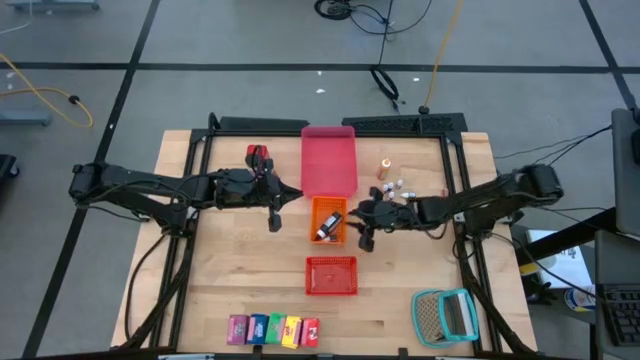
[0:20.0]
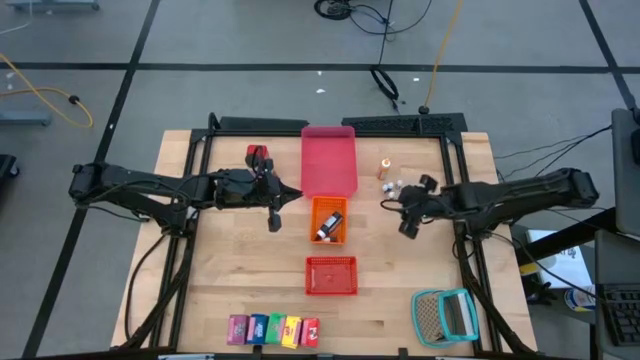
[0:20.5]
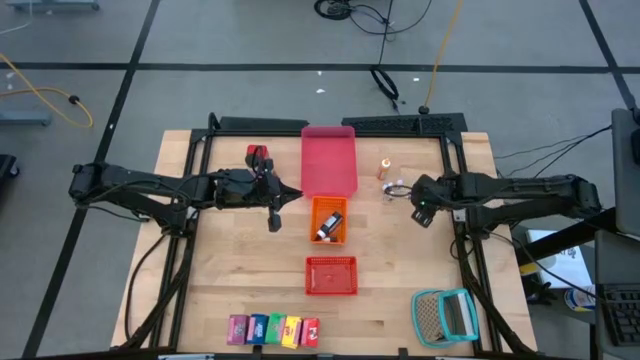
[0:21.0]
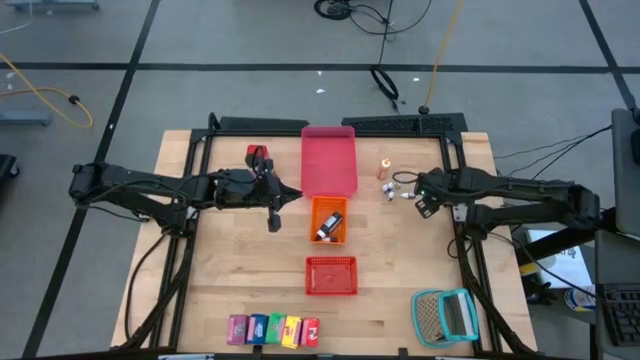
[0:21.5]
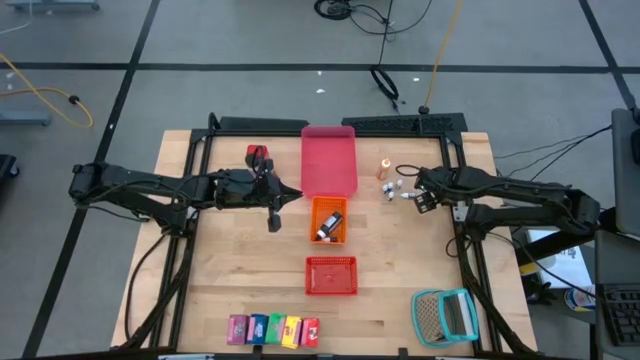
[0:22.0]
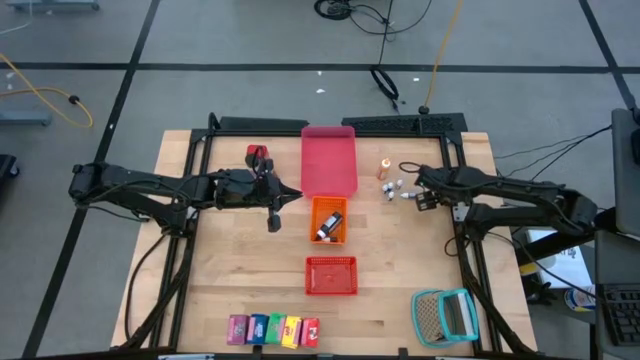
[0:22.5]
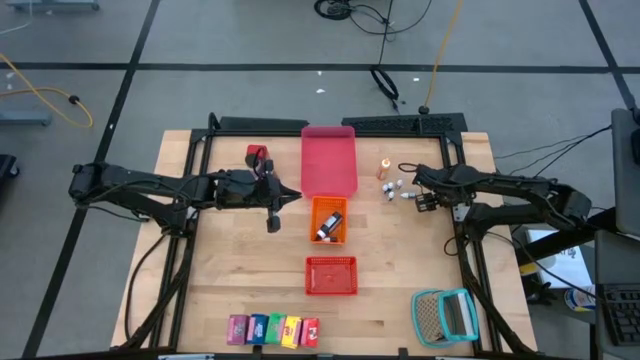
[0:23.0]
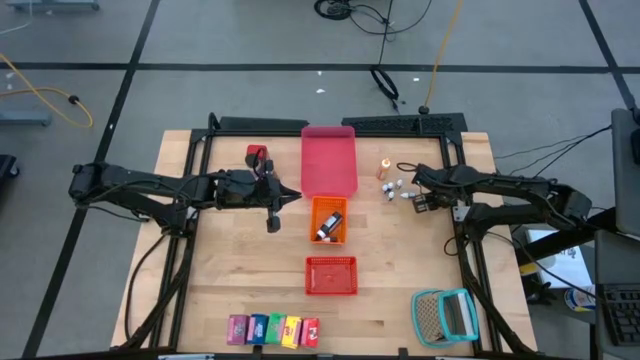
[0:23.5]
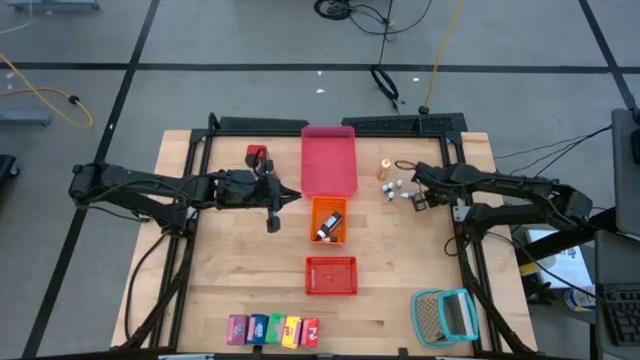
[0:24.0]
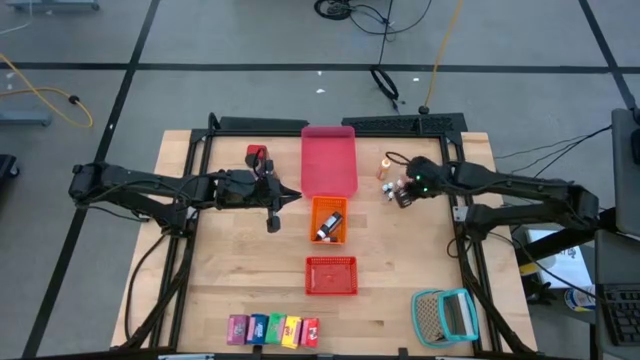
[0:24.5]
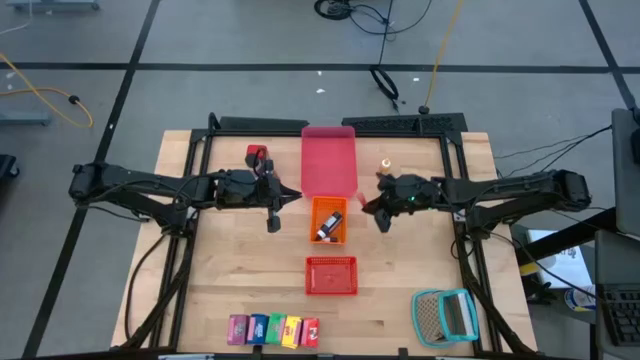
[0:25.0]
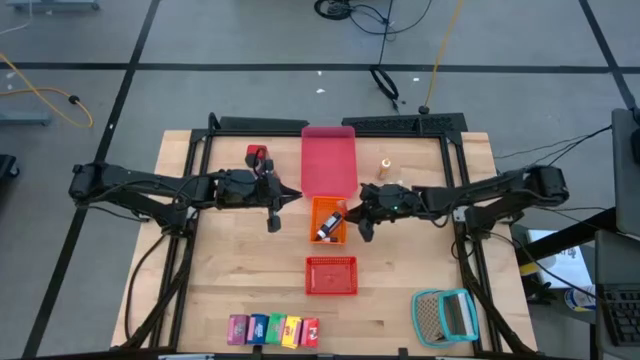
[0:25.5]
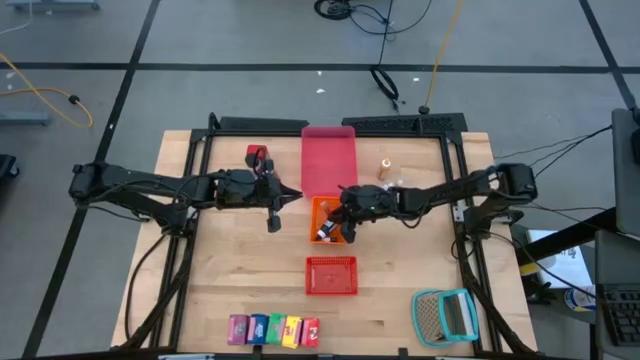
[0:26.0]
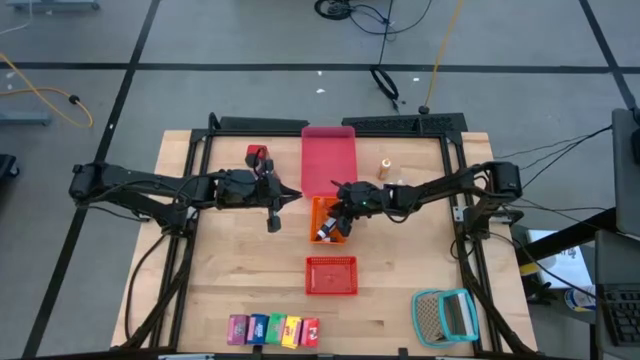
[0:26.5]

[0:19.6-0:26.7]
Task: Pick & Place Kitchen Items
Put the yellow food coloring bottle into the orange basket

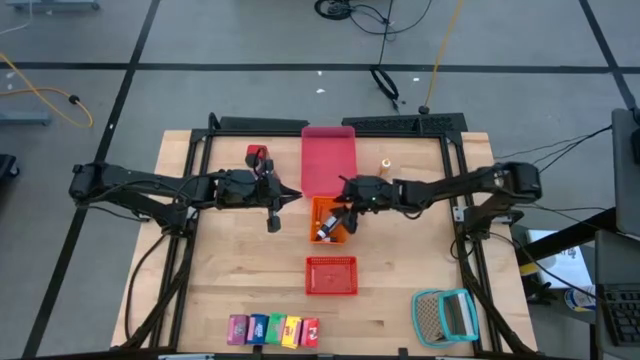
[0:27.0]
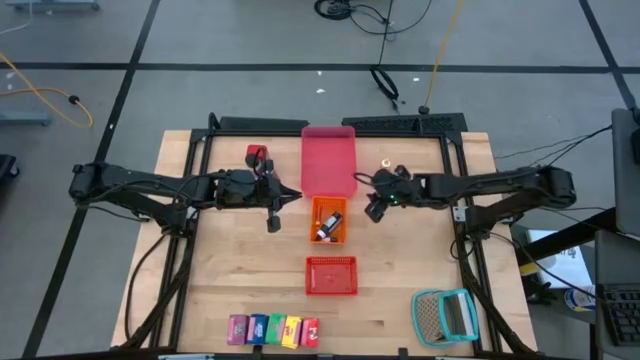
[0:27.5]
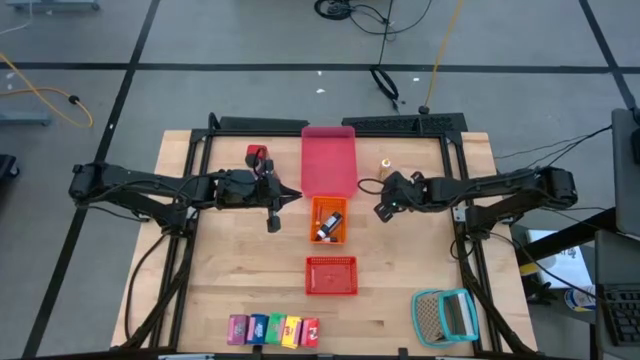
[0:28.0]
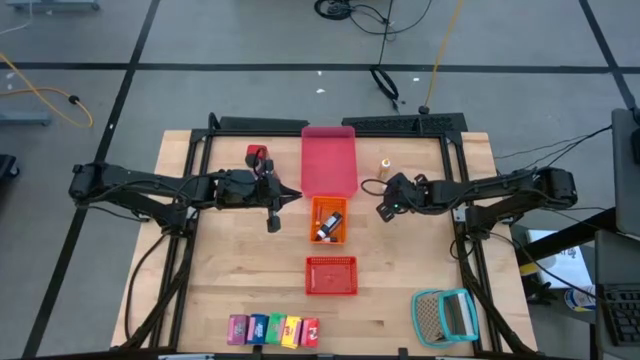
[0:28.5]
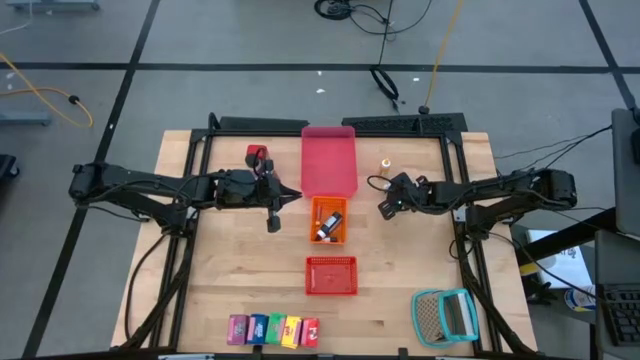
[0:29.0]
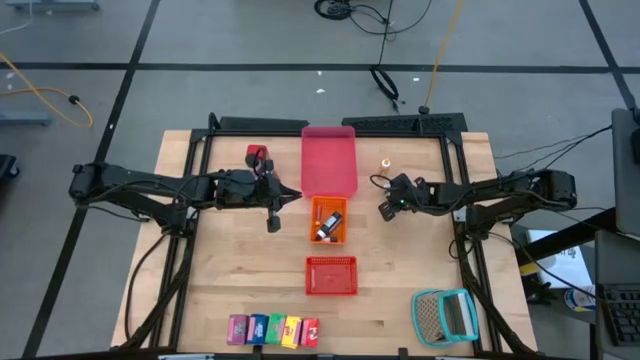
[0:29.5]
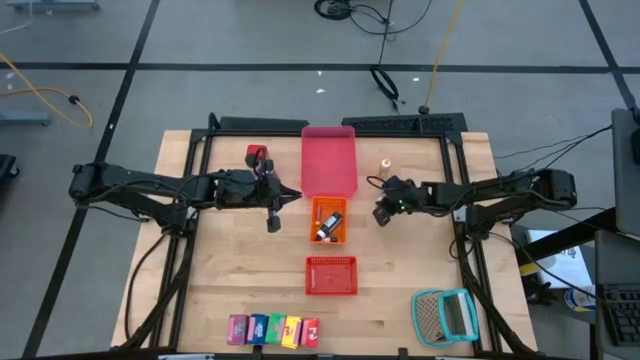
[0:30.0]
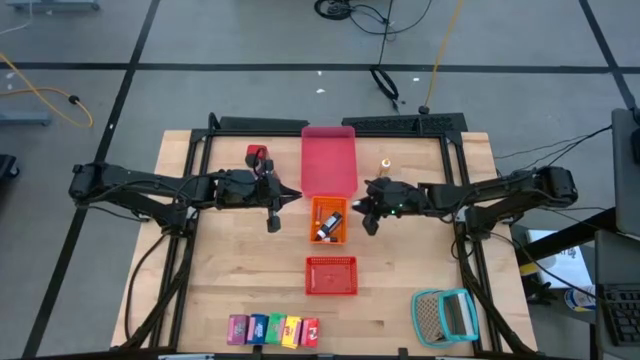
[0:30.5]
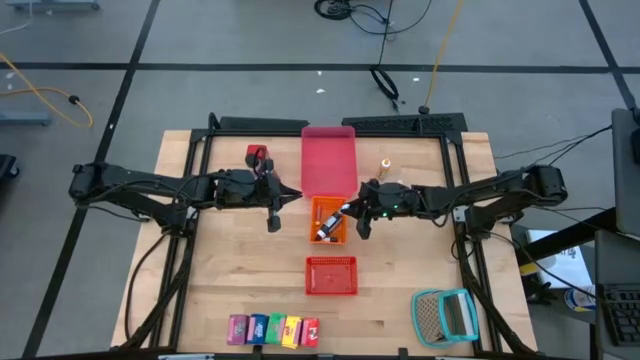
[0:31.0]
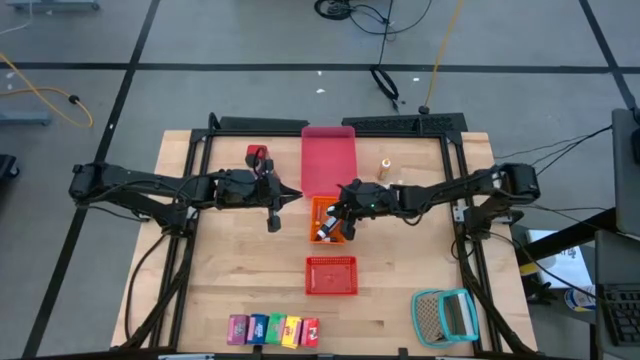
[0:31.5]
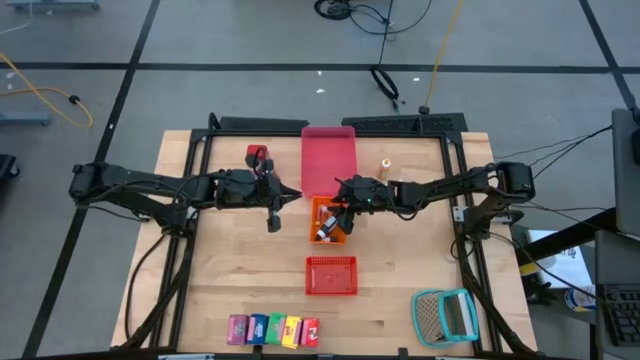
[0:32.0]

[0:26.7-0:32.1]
Put the small green food coloring bottle into the orange basket

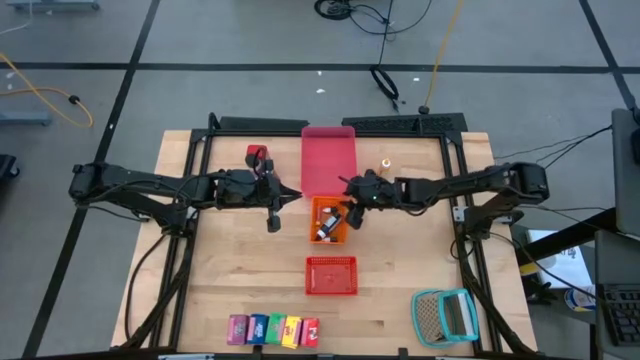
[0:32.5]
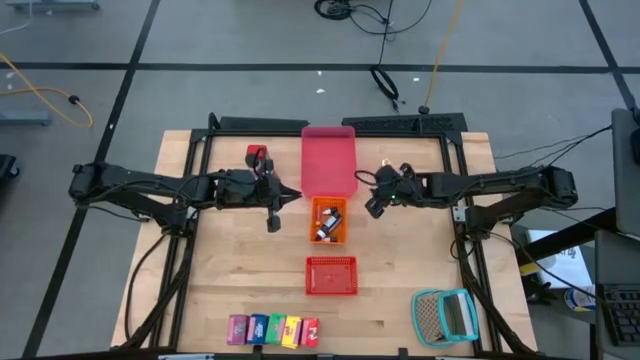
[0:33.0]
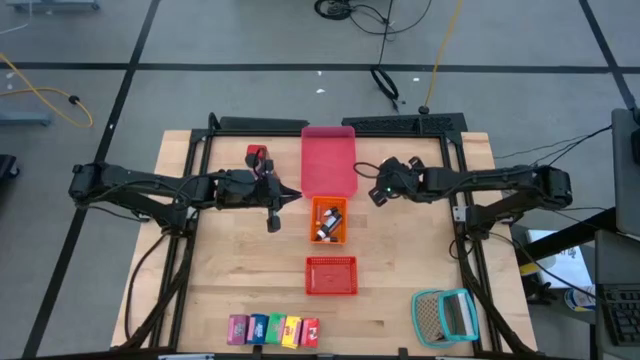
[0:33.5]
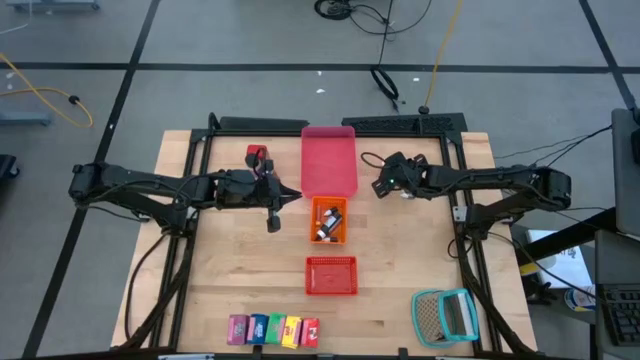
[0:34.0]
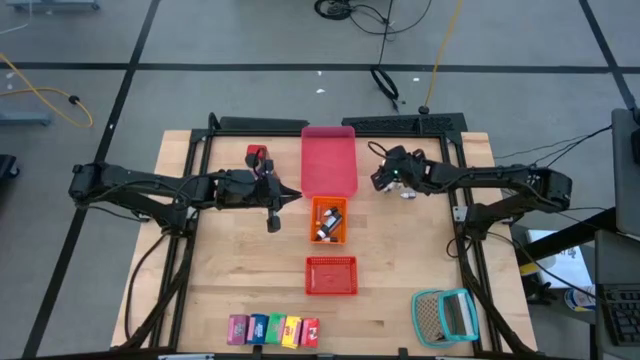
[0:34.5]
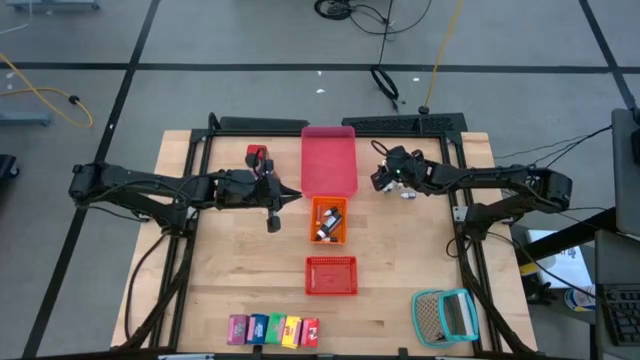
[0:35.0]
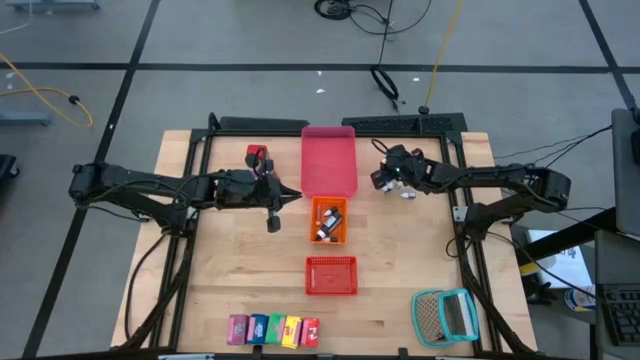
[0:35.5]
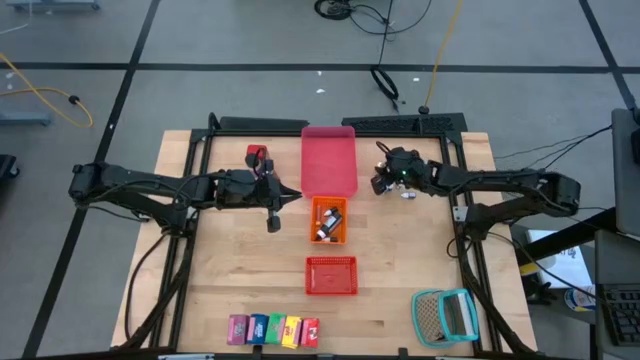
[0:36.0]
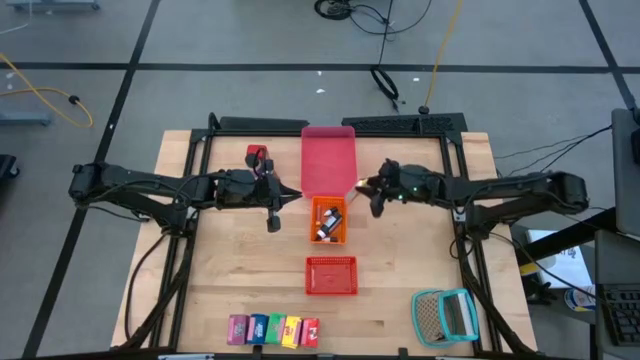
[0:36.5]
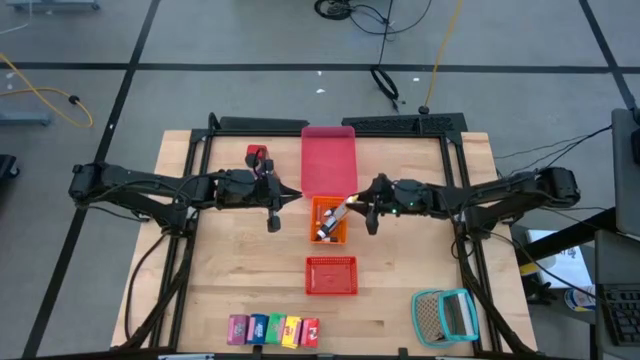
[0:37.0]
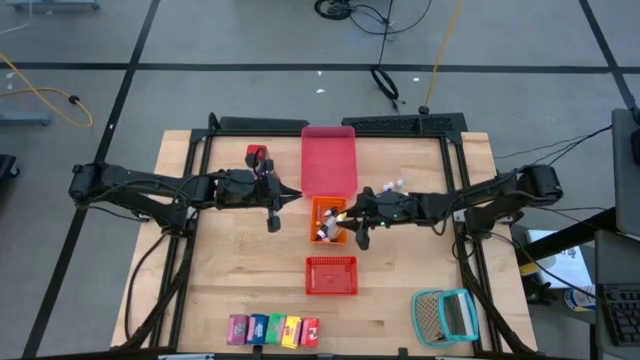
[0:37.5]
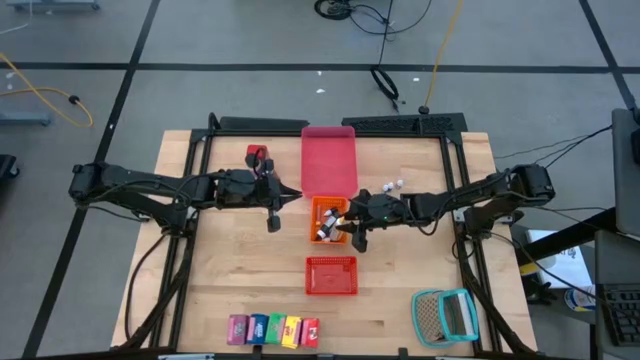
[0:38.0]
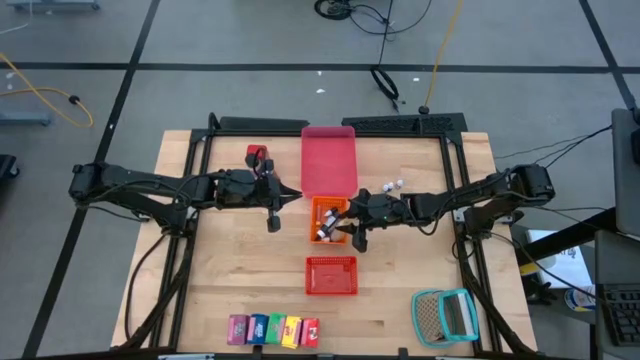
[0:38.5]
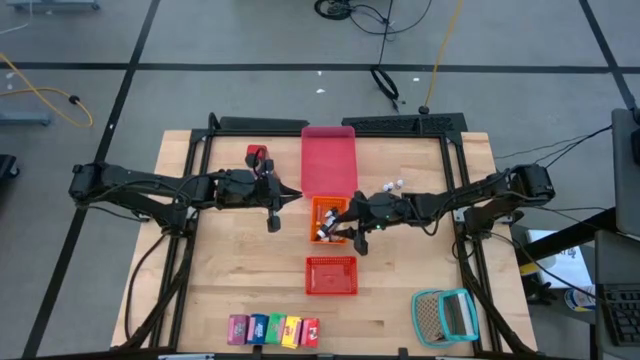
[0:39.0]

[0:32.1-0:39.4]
Put the large yellow food coloring bottle into the orange basket

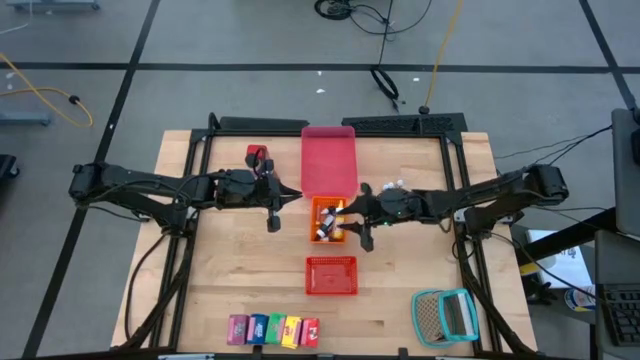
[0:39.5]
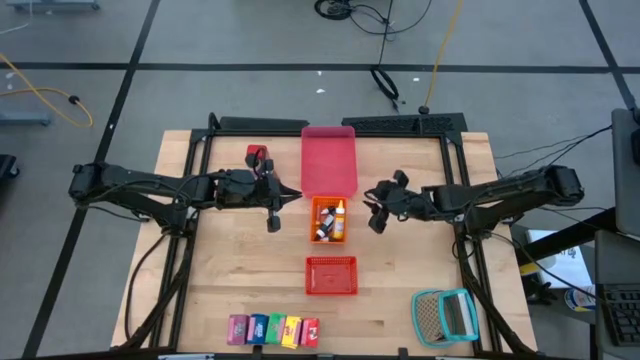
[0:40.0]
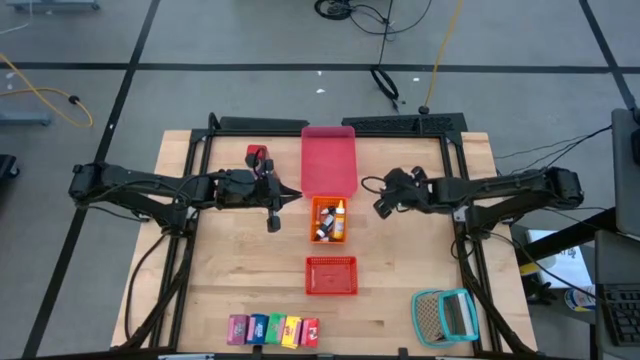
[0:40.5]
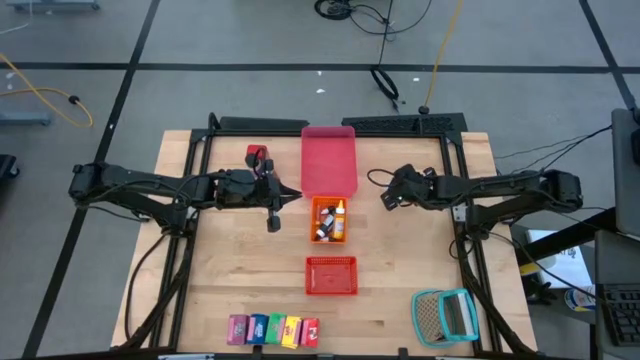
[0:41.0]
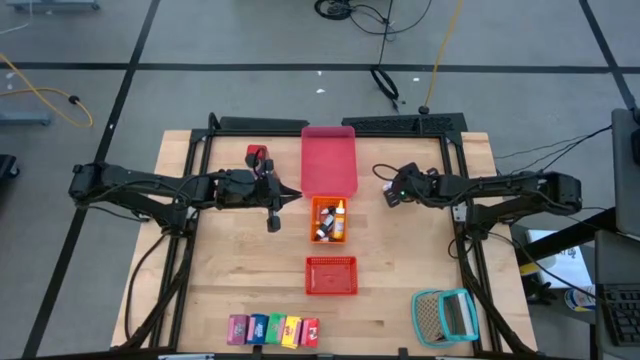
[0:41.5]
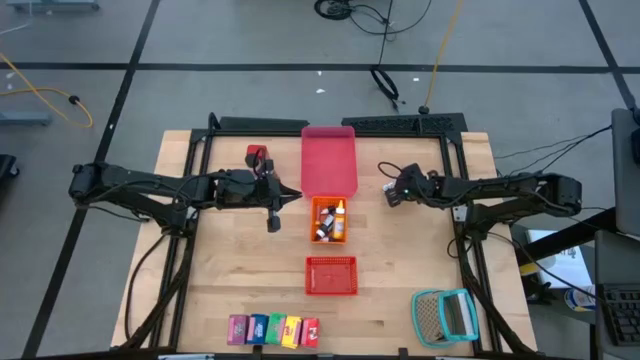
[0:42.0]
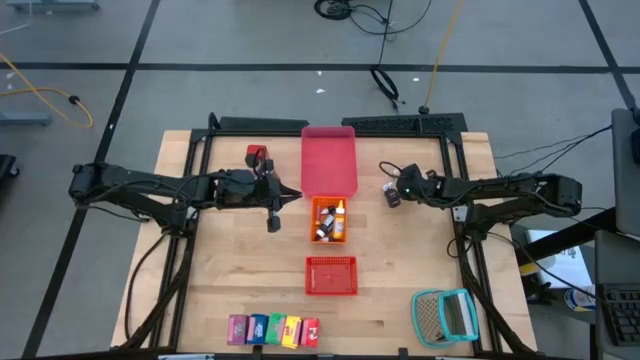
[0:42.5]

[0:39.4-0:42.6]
Put the small red food coloring bottle into the orange basket
